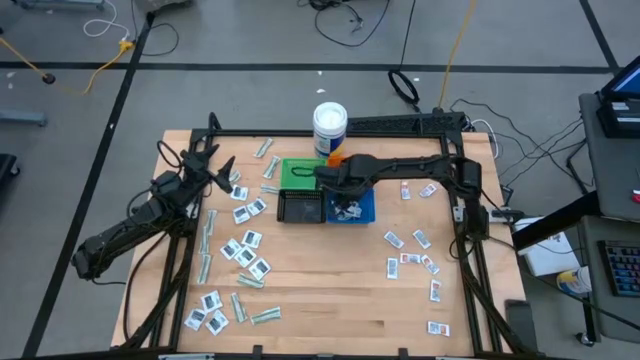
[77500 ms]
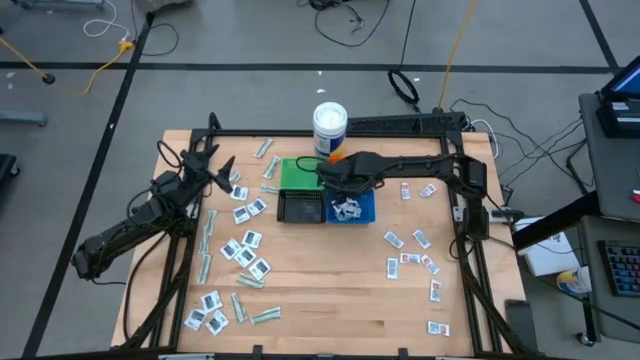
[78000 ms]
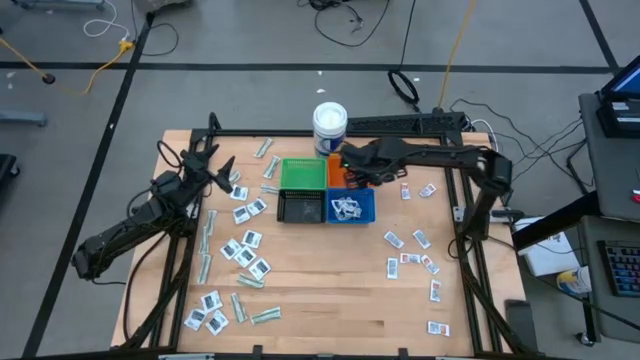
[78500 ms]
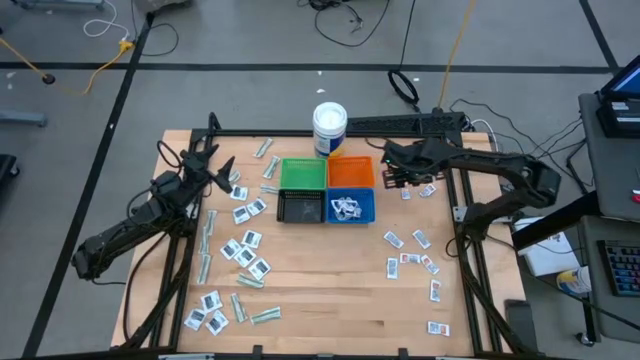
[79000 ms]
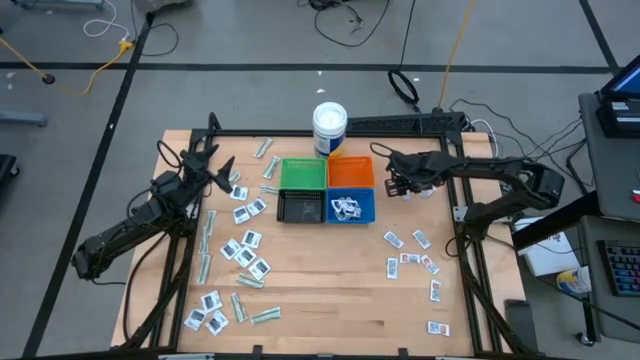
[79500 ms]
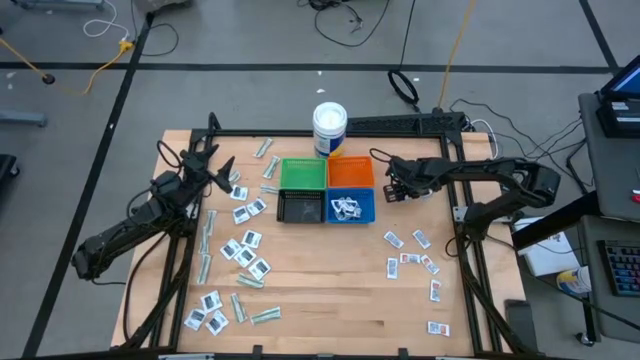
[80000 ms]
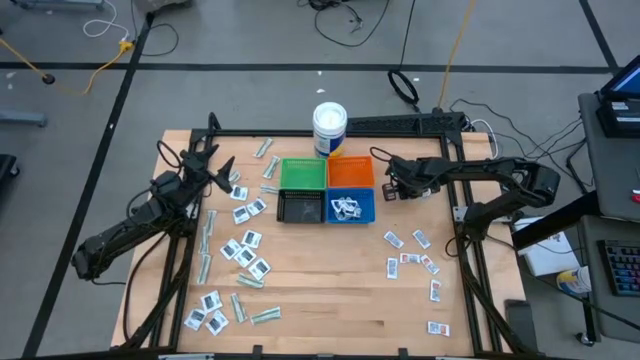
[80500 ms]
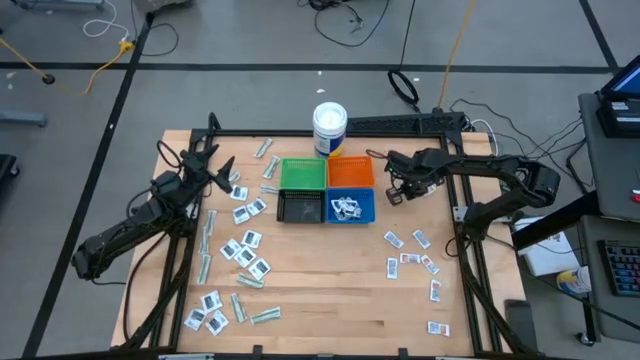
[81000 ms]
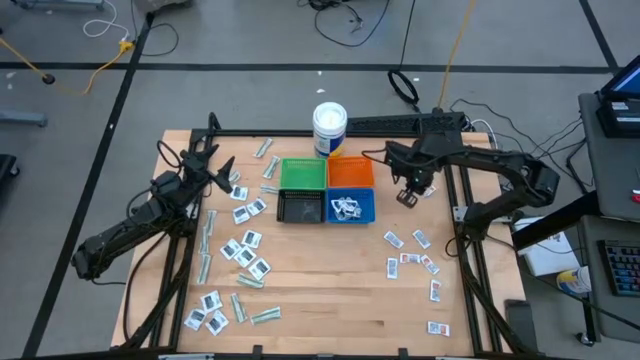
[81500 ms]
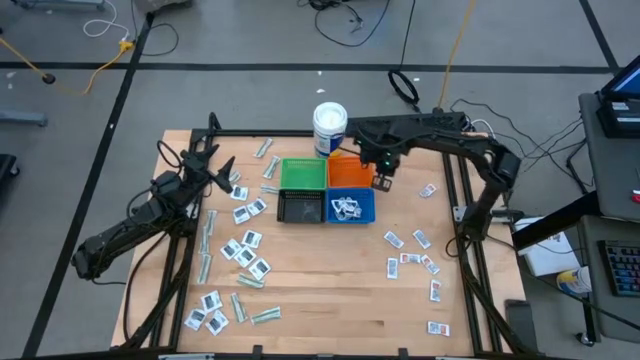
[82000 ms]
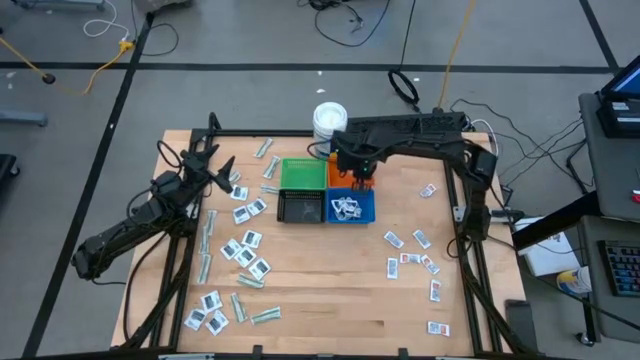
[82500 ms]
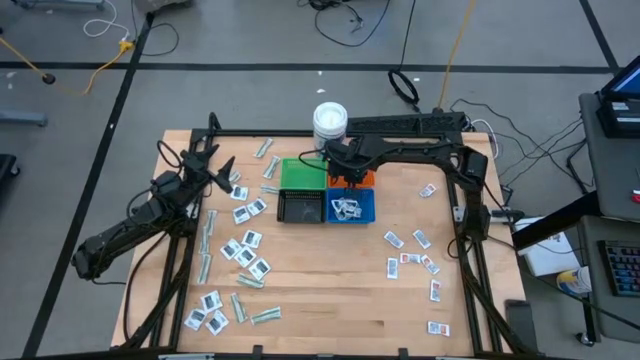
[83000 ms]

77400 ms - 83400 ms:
Task: Pick & Place First Aid Supplies
Put the orange ointment pack into the orange basket

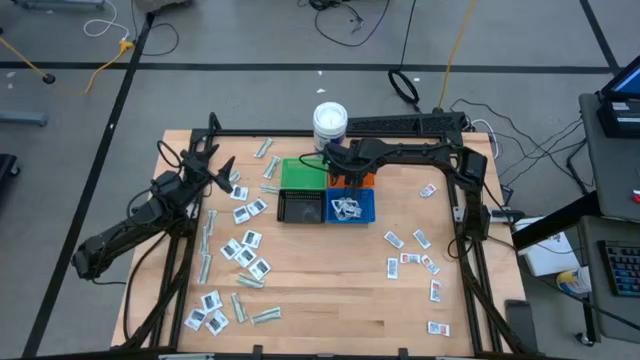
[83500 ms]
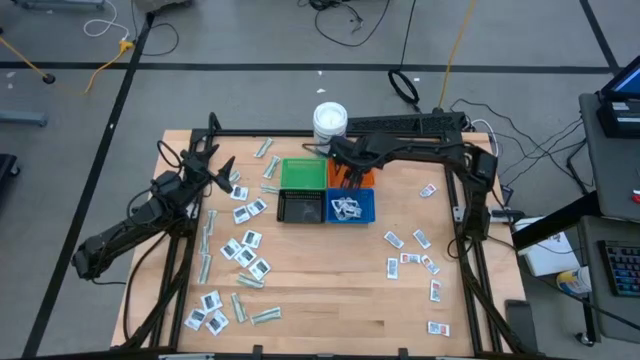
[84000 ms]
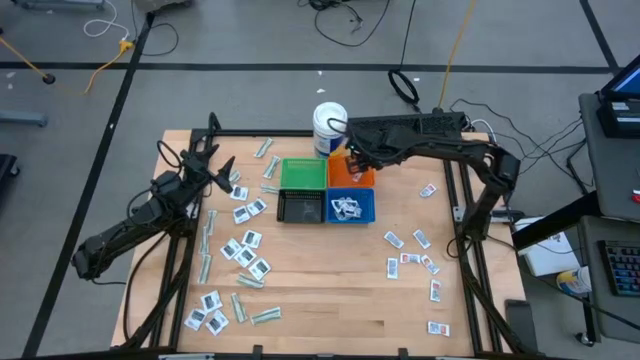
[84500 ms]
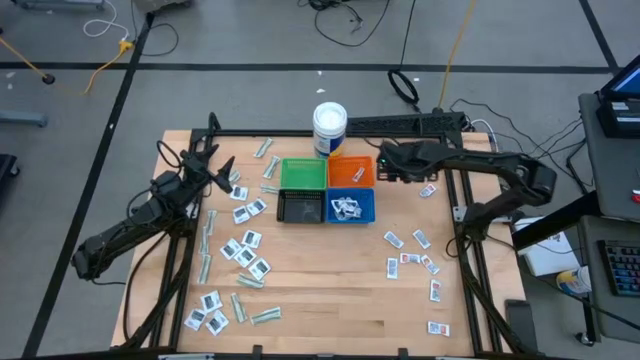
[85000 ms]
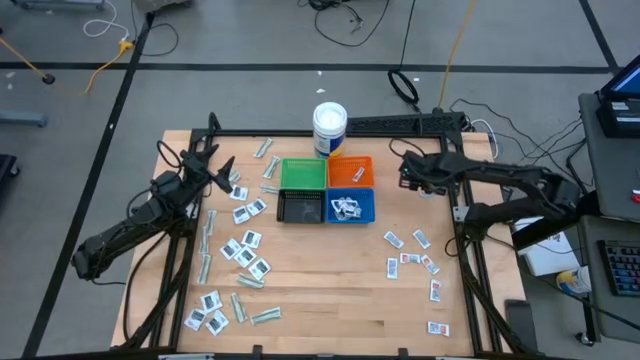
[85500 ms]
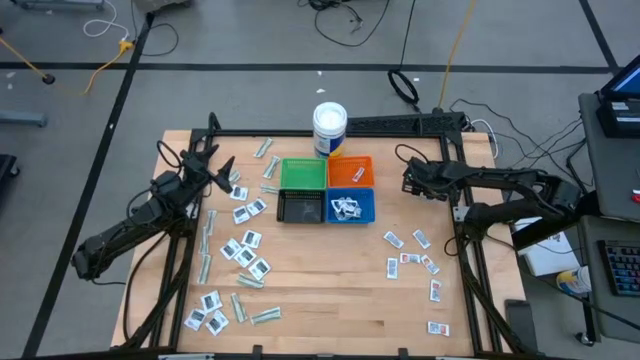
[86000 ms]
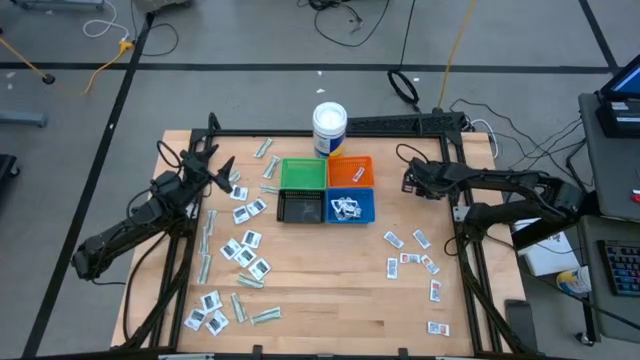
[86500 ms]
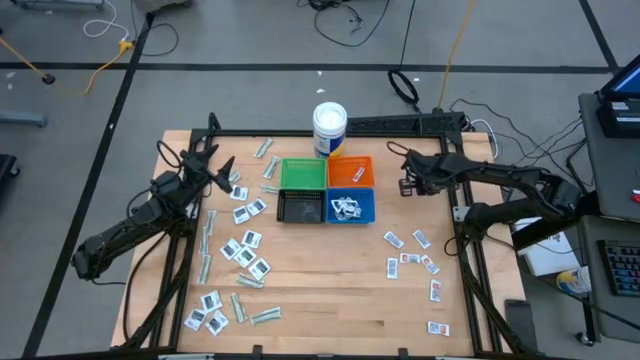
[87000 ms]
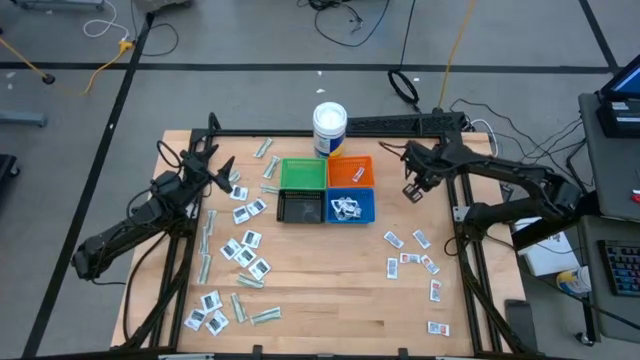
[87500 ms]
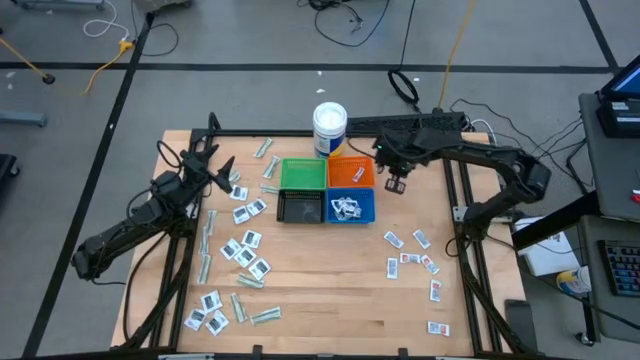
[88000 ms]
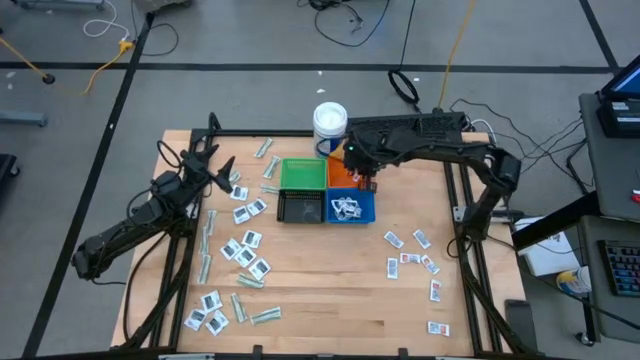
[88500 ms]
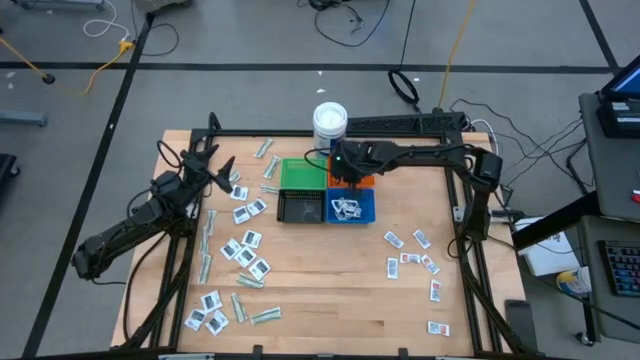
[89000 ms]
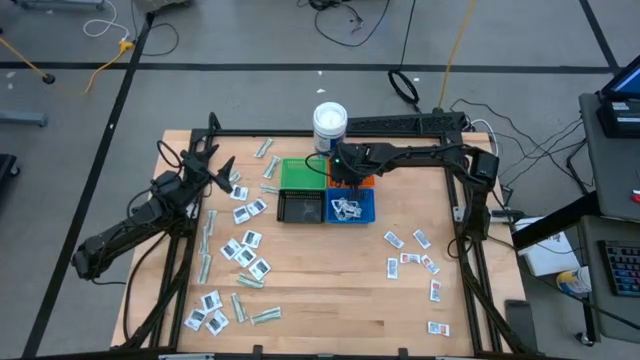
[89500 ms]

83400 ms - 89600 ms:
Put the orange ointment pack into the orange basket

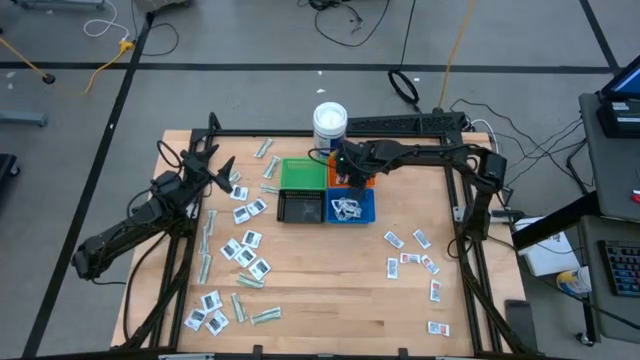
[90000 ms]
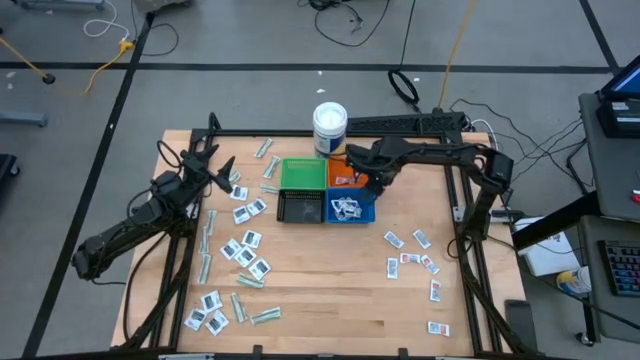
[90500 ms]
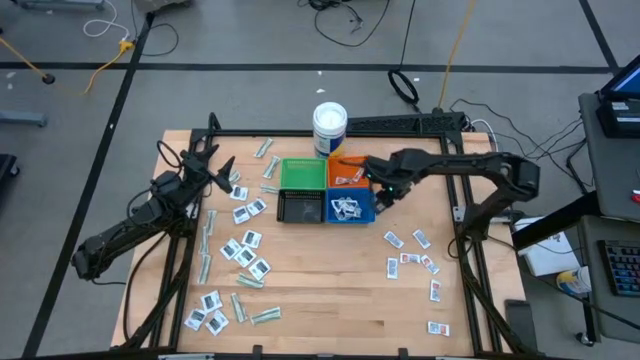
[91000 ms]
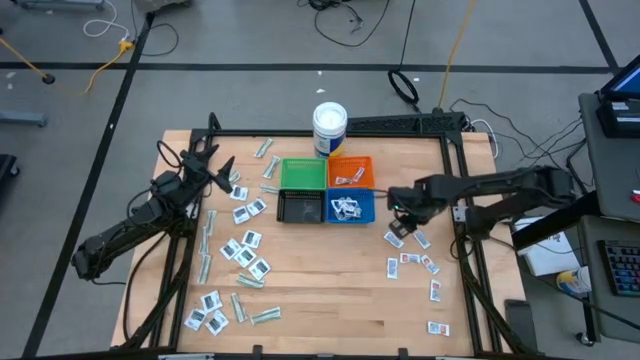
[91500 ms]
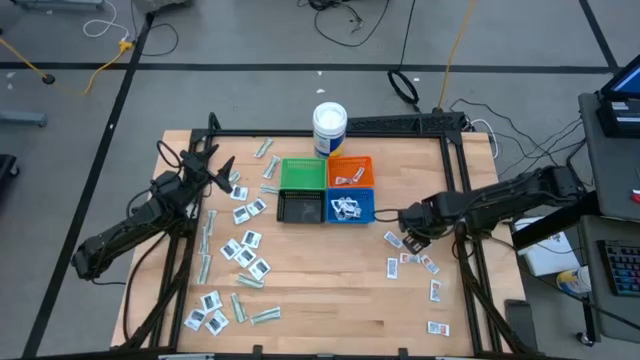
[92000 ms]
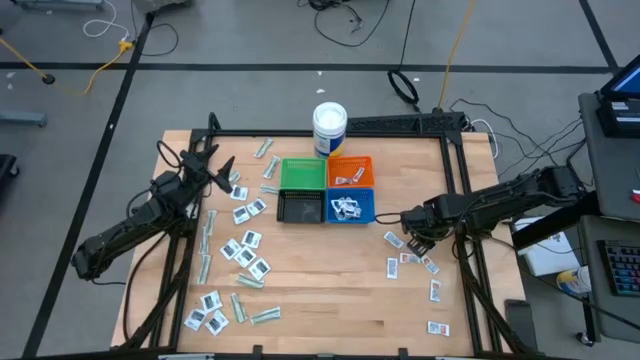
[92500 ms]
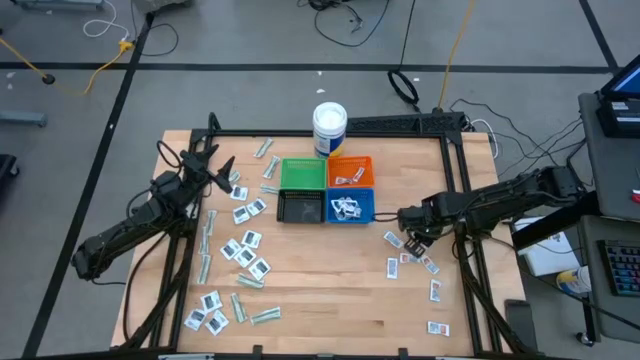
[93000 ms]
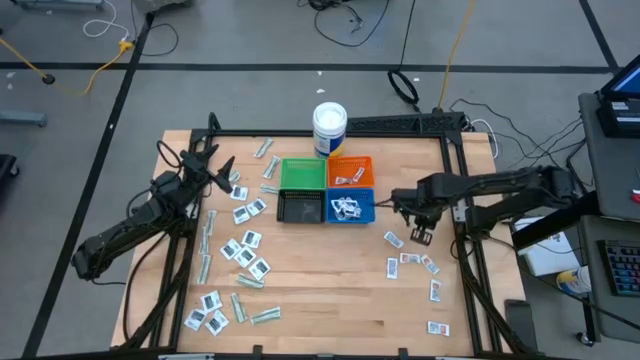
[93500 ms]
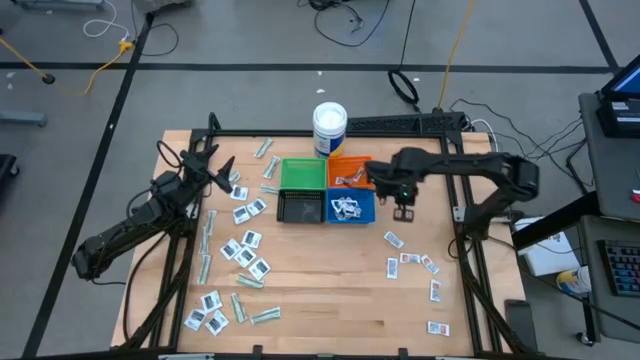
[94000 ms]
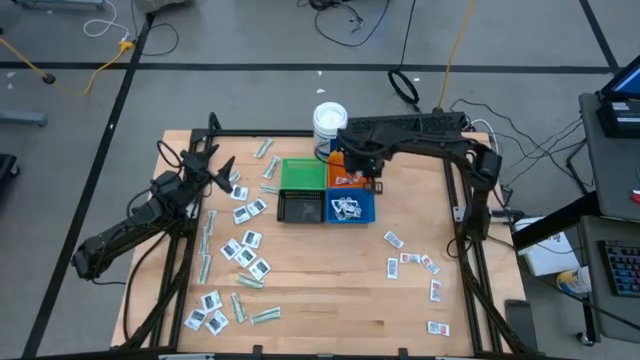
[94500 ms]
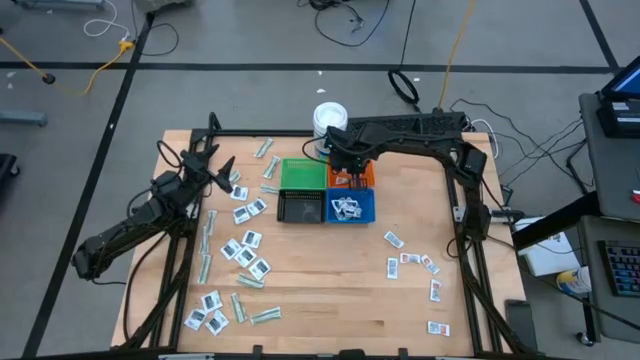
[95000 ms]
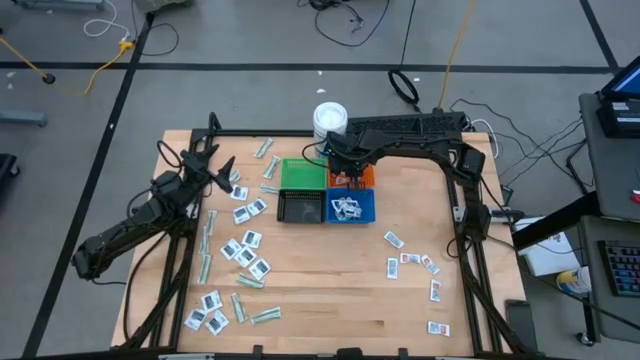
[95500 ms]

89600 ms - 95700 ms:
Put the orange ointment pack into the orange basket

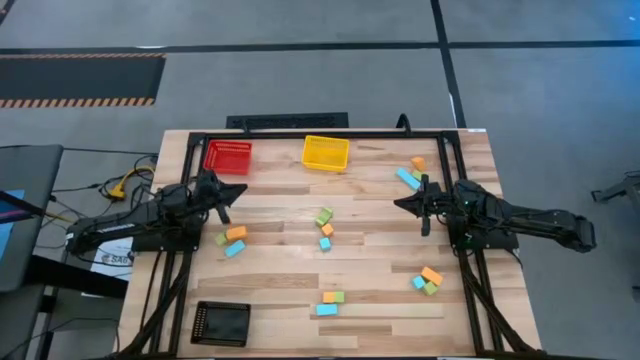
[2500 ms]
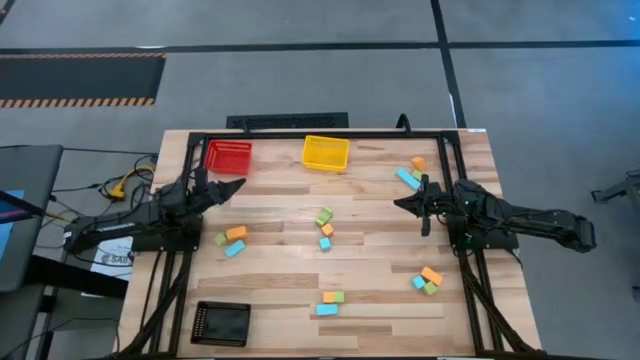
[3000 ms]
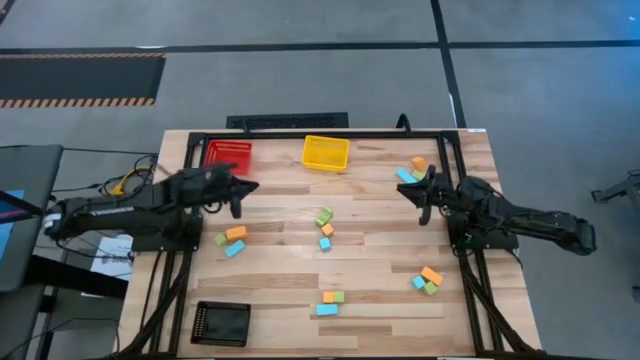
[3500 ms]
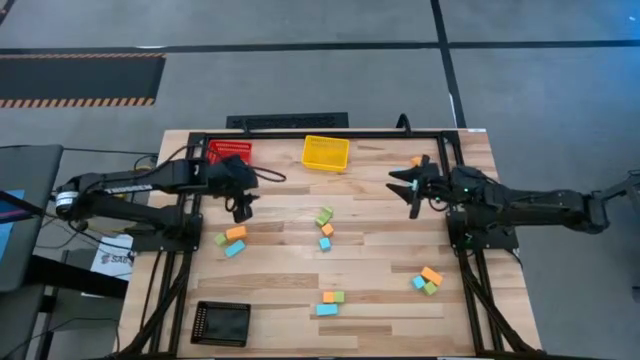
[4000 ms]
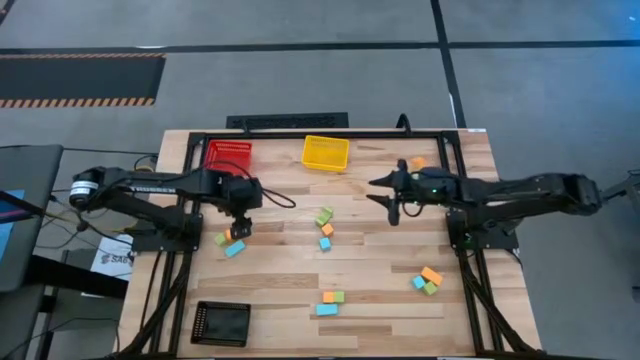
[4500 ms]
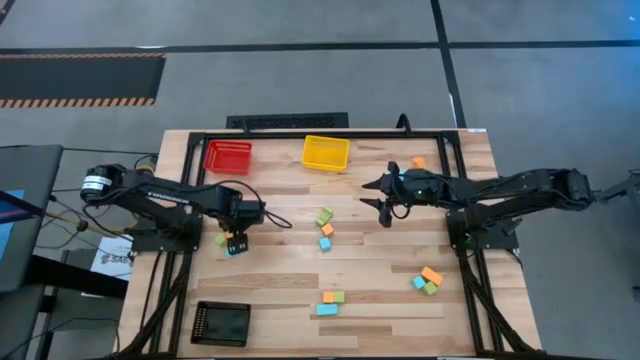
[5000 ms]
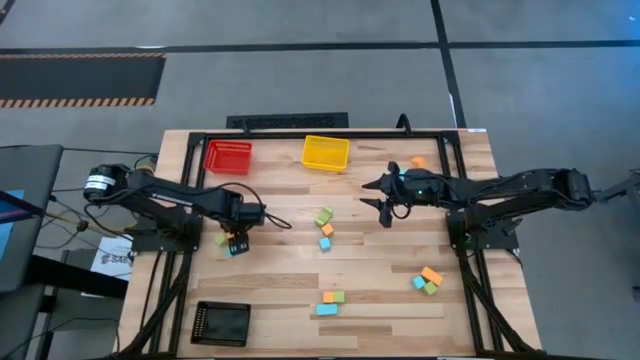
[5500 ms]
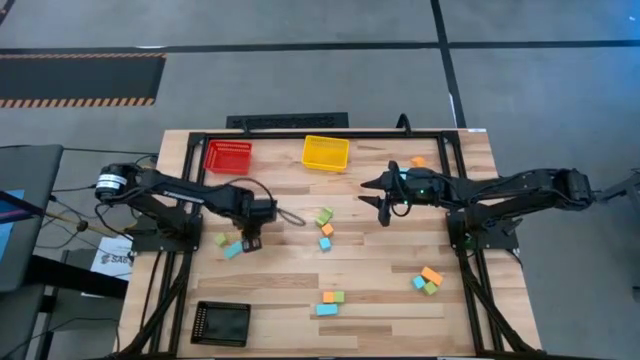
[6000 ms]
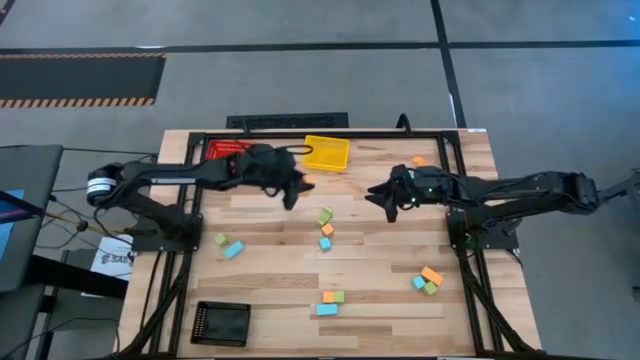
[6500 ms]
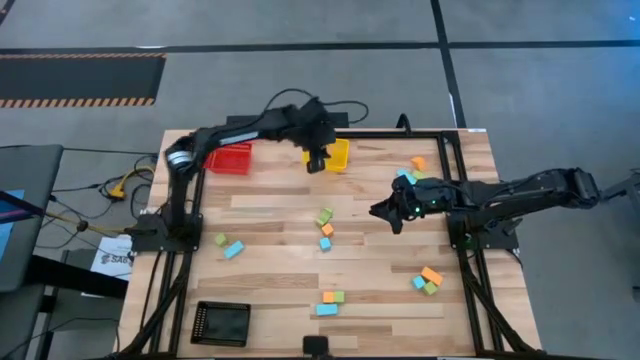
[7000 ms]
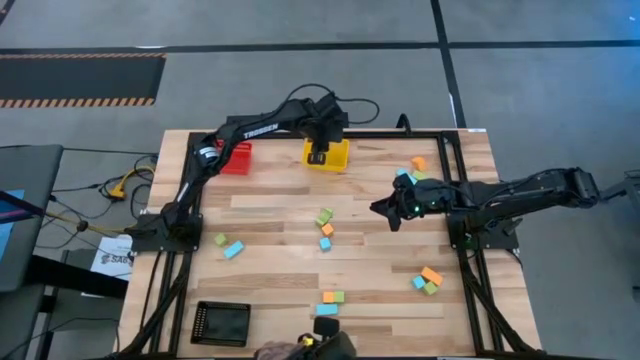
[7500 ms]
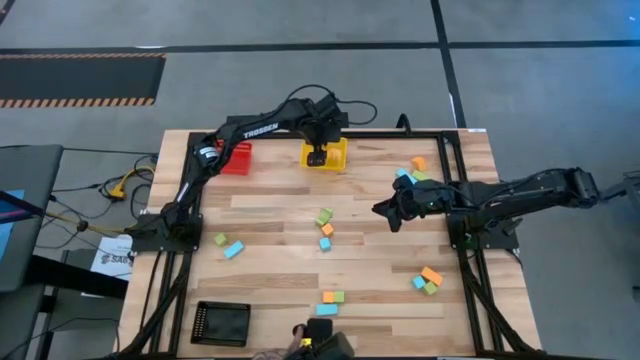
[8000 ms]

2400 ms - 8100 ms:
Task: Sort & place blocks by color
Put the wooden yellow block into the yellow bin
